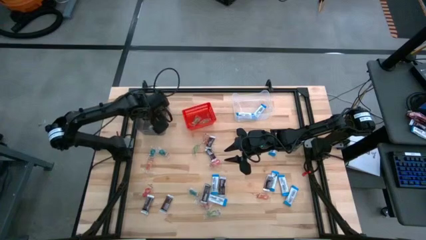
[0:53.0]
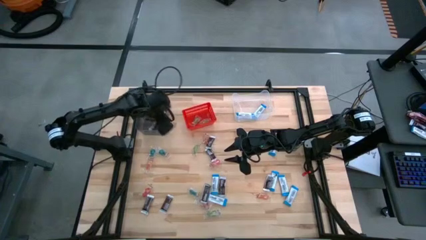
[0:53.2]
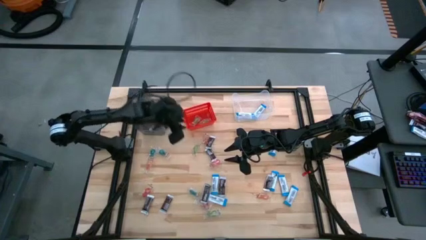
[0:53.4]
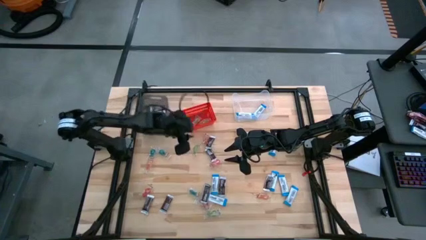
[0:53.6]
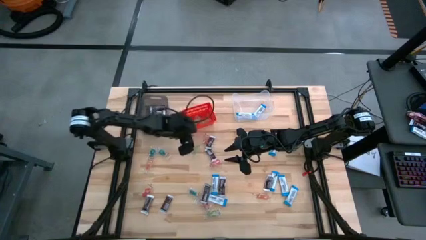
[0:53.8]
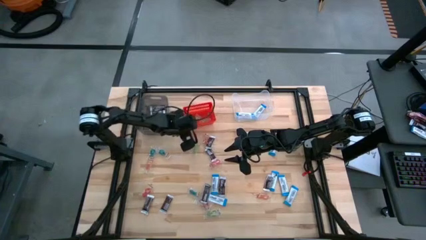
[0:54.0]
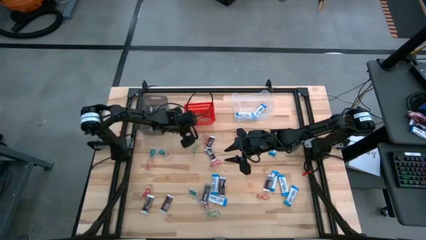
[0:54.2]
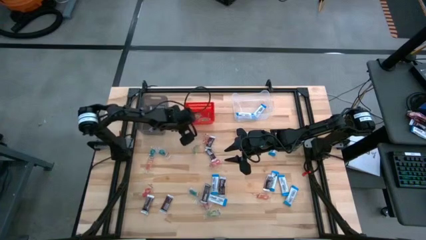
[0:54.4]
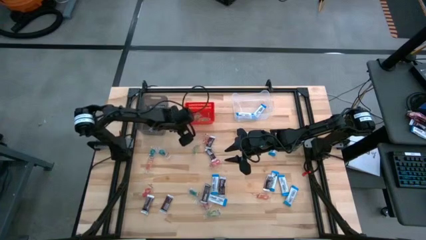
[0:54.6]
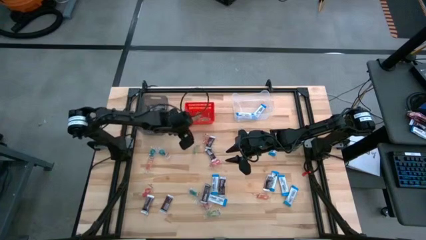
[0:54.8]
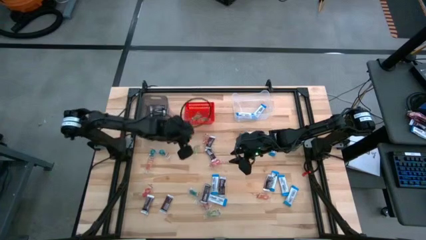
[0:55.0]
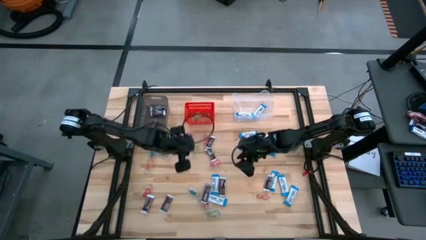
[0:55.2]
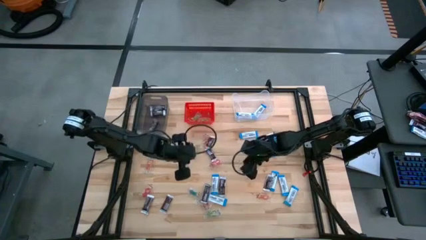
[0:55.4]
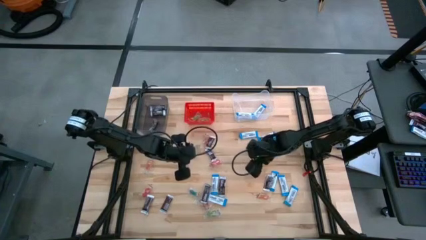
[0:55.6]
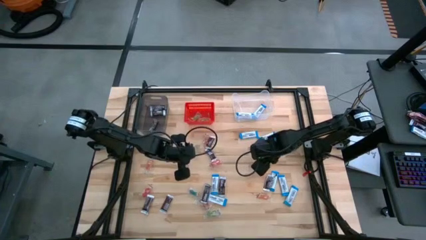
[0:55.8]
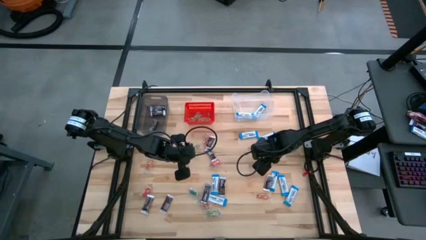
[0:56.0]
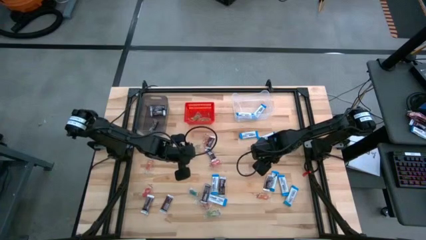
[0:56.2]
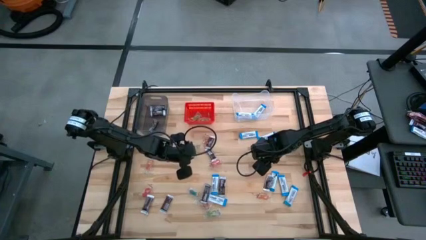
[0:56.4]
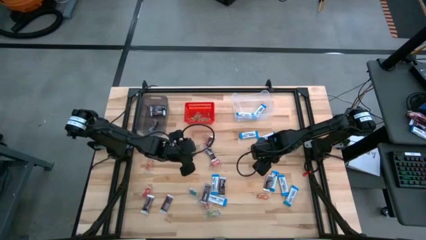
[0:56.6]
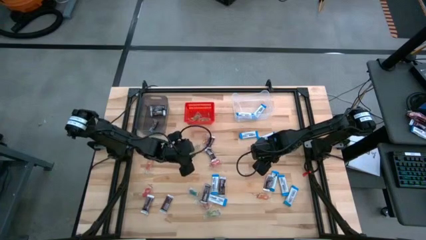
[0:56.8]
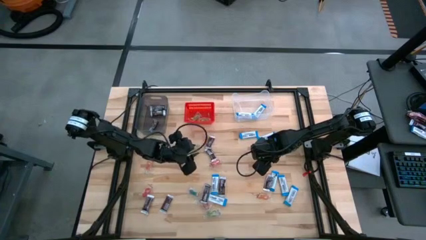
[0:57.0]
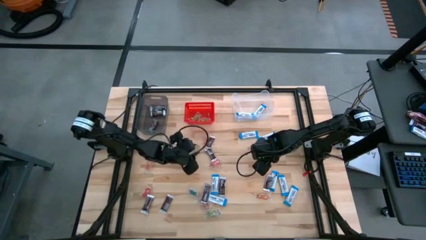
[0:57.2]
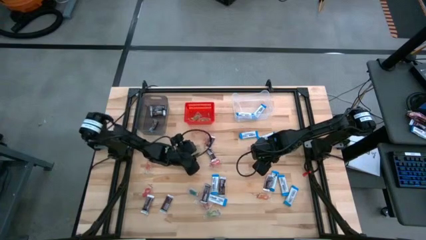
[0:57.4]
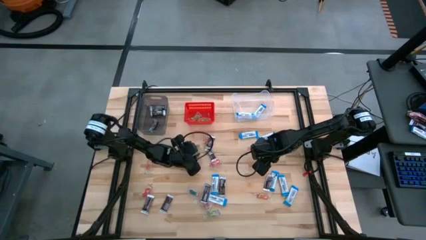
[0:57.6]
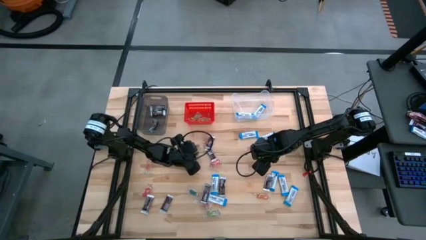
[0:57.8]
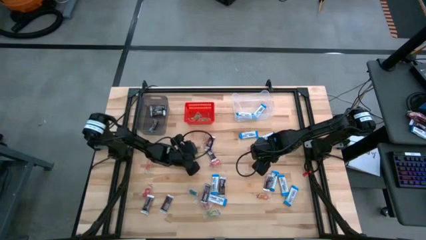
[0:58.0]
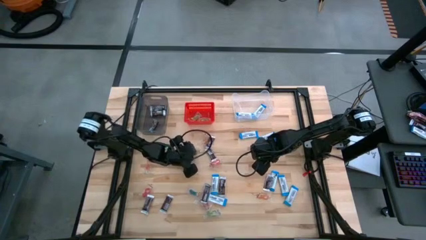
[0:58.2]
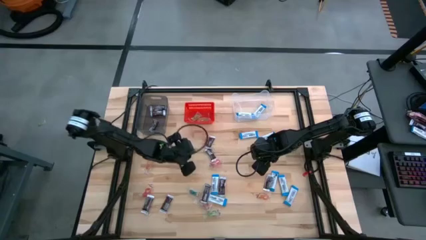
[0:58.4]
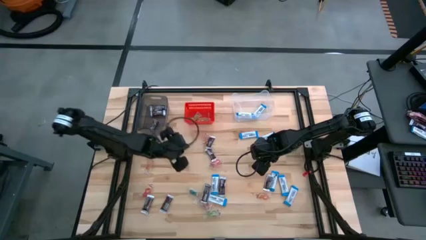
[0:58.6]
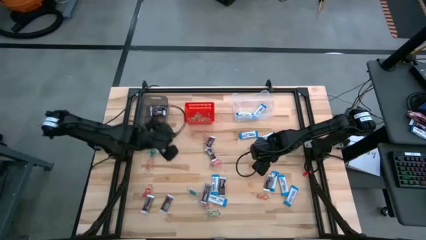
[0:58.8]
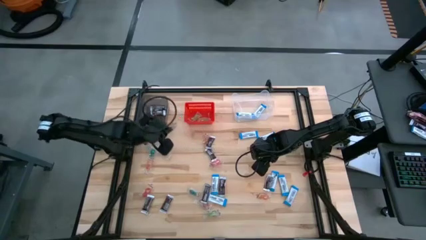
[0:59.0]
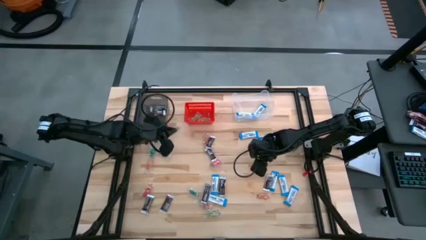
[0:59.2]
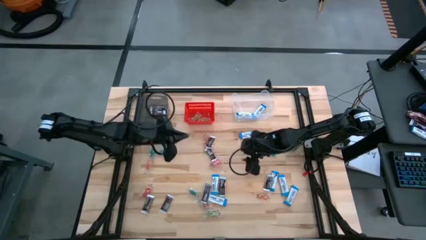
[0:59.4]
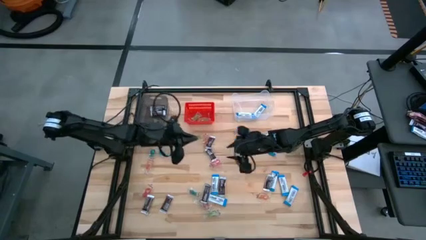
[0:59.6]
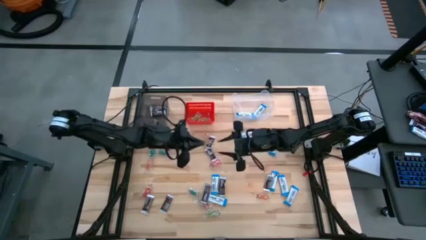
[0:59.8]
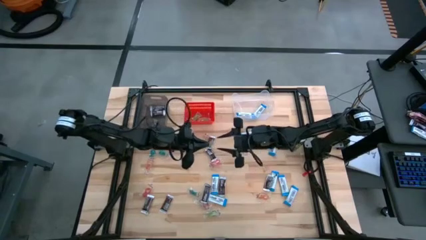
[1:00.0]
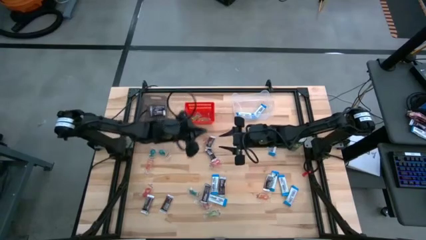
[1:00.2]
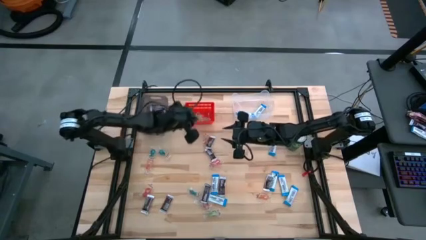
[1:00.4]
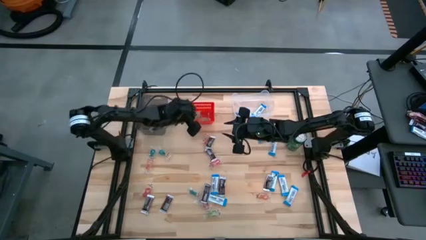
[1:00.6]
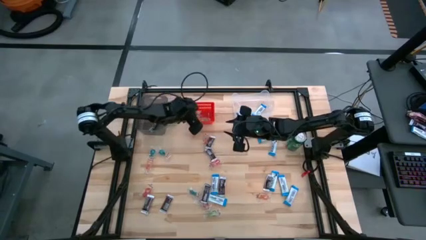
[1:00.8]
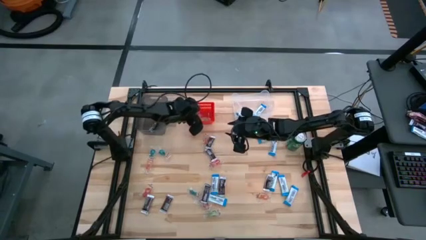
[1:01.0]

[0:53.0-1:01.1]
Task: Sort candy
Put the green gummy into the red bin

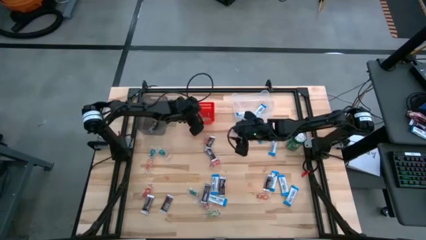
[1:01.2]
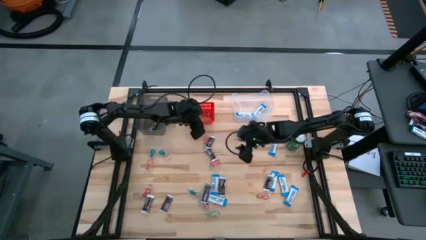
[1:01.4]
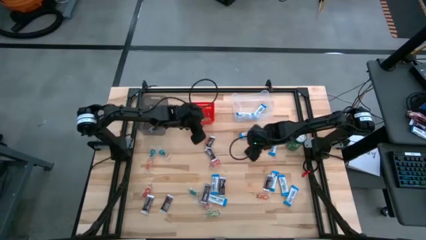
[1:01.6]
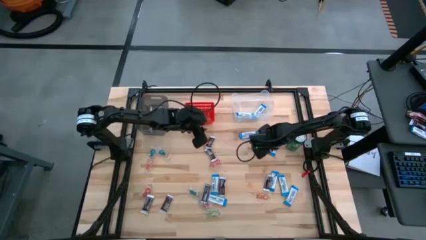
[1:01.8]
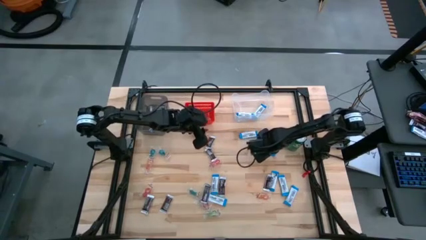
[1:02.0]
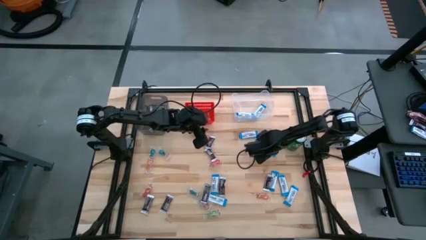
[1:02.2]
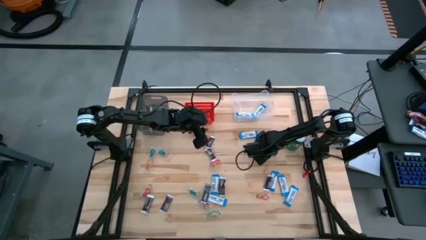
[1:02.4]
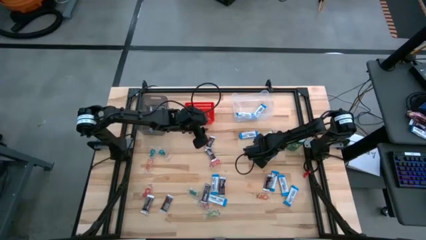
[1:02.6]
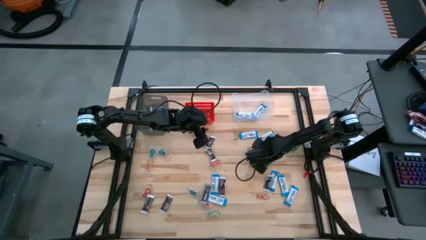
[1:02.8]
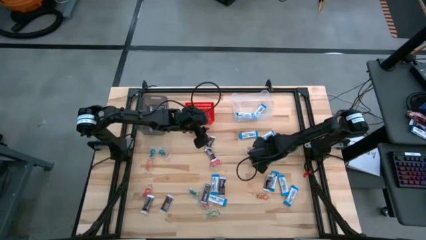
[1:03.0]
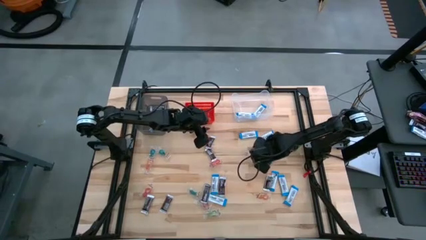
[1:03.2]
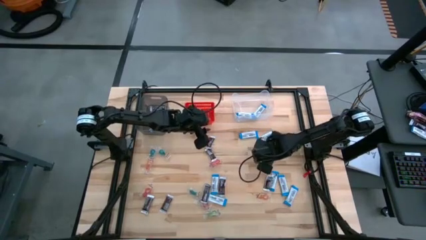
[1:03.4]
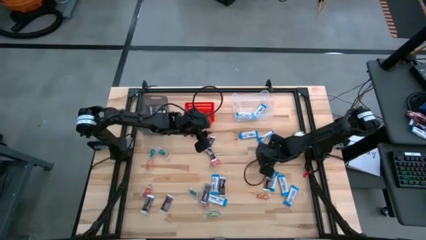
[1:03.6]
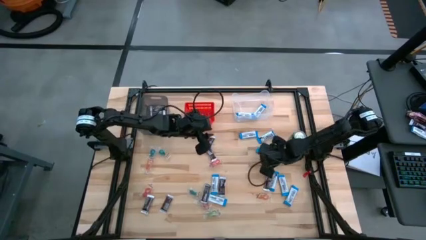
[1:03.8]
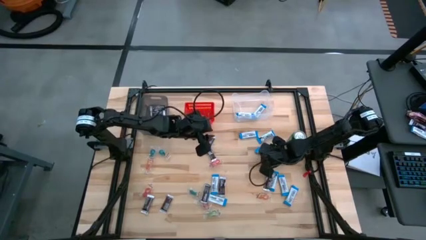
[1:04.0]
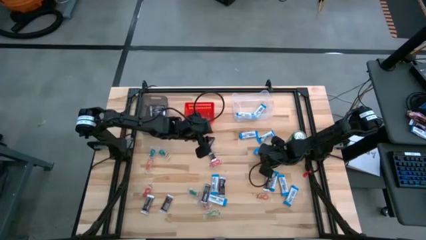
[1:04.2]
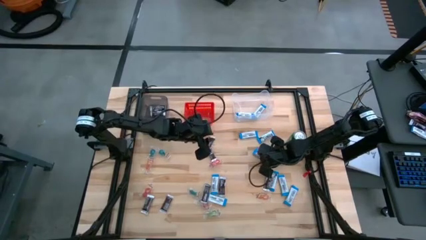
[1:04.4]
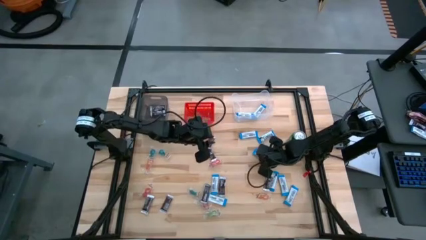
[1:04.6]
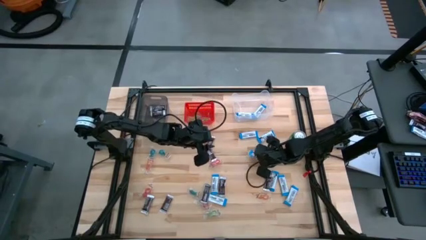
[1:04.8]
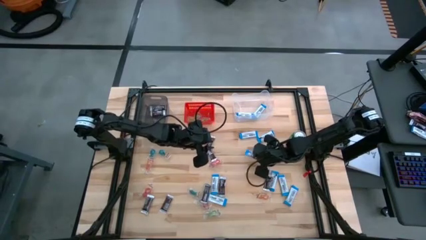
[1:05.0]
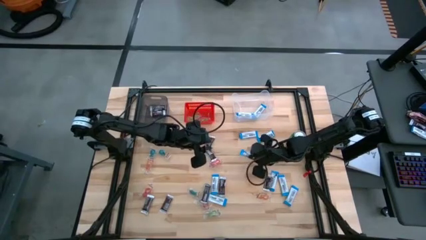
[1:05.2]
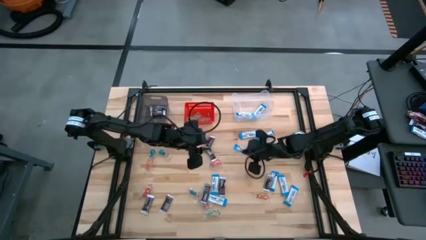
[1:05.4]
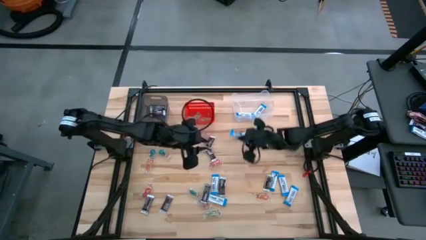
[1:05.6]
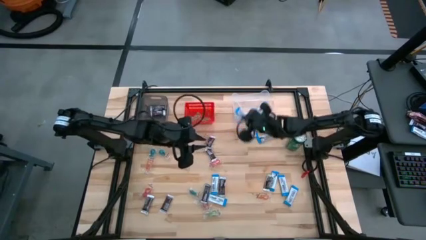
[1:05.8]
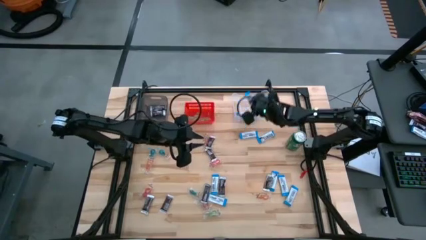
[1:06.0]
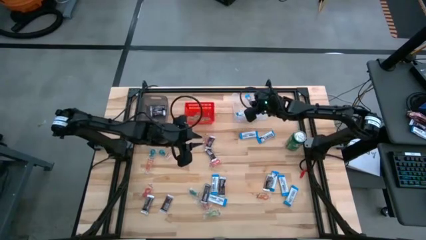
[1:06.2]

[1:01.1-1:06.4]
Put the white chocolate into the transparent bin

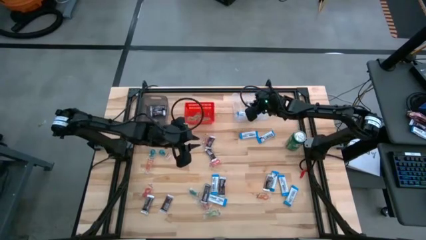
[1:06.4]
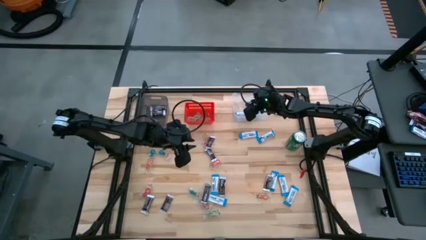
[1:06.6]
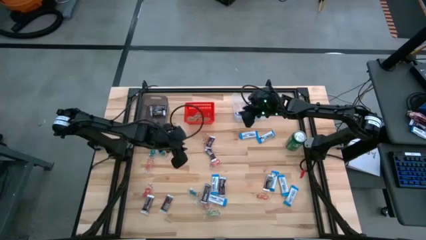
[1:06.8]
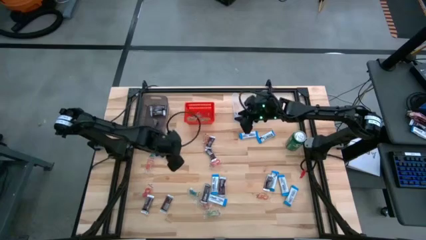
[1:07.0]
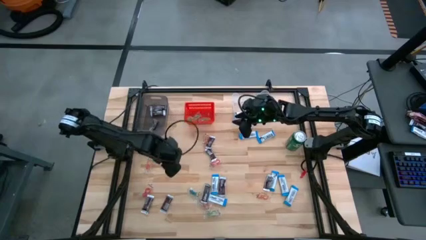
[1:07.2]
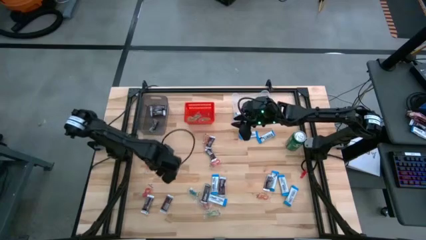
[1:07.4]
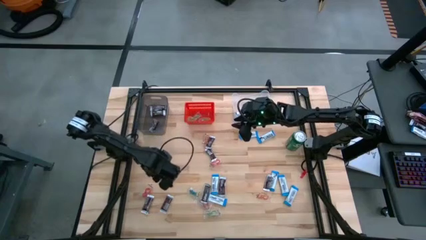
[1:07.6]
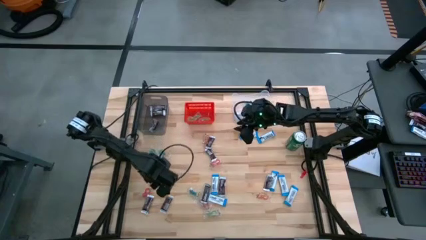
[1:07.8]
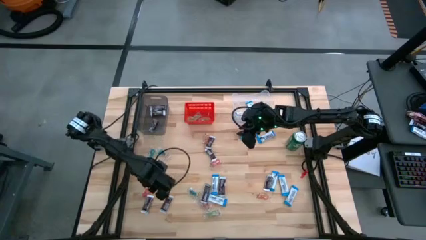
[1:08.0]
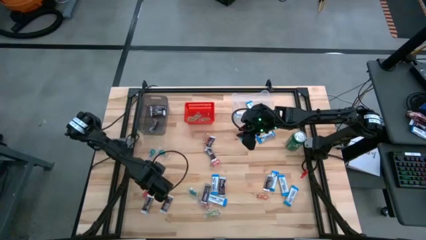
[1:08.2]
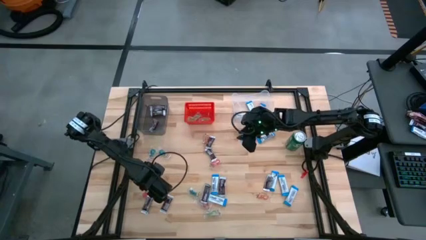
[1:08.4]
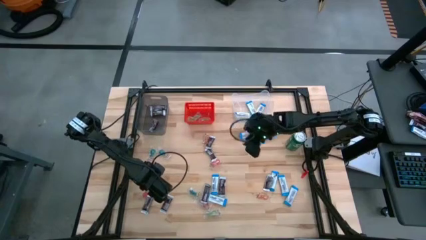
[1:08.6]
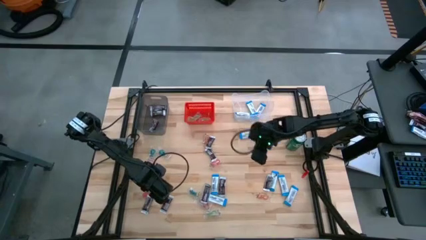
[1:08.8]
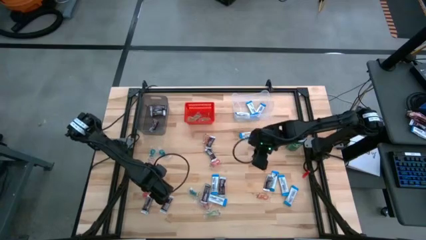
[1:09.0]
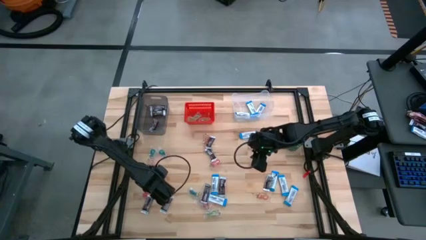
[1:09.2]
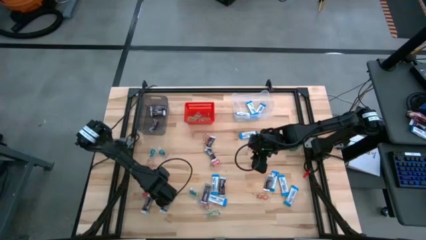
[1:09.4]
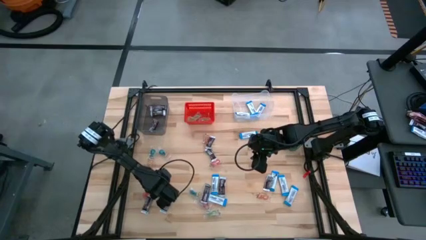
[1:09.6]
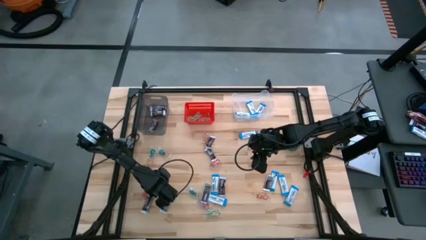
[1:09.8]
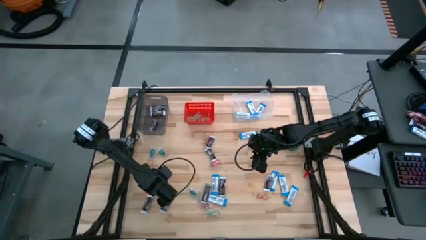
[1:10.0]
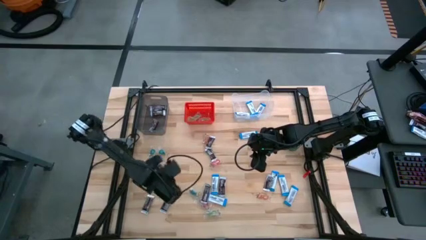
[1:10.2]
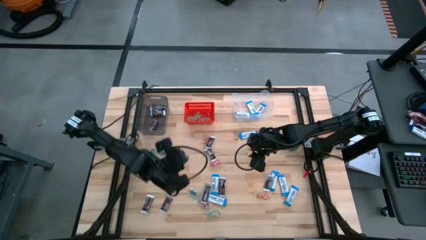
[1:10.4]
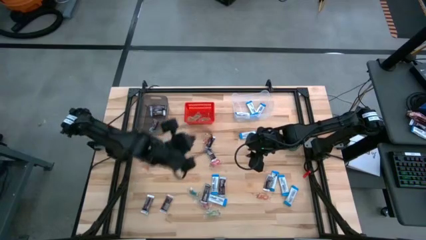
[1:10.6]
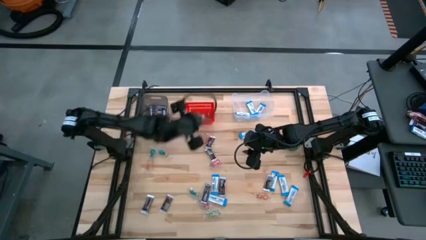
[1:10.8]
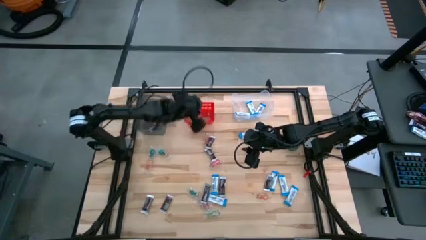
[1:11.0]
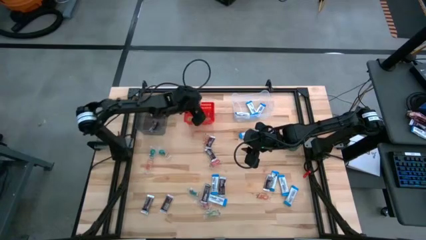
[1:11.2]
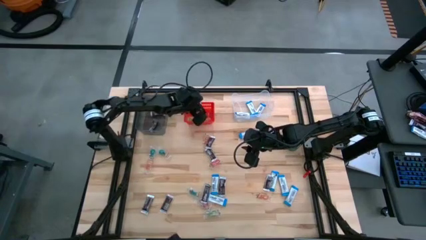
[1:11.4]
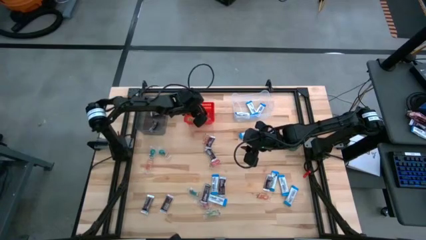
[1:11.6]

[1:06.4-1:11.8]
Put the red gummy into the red bin
